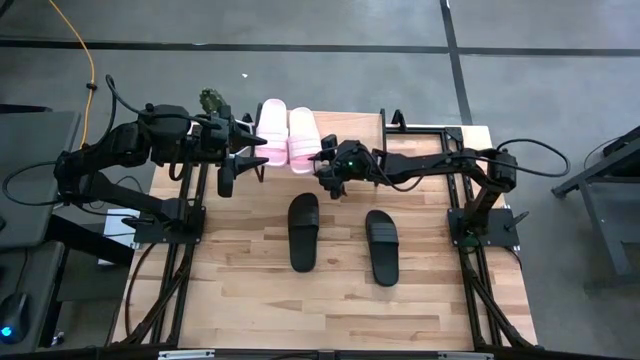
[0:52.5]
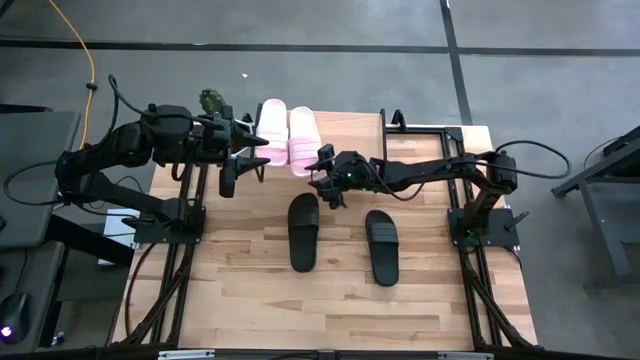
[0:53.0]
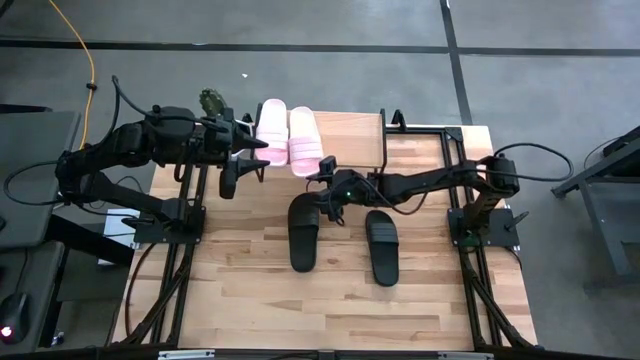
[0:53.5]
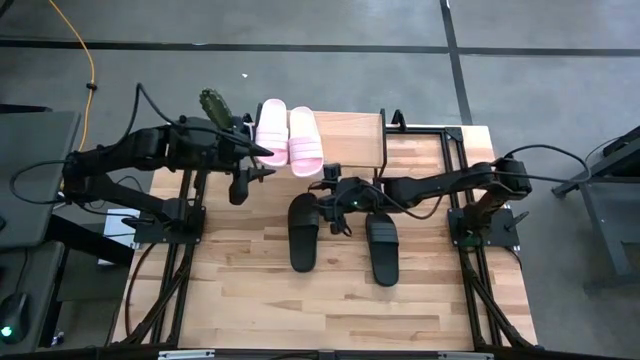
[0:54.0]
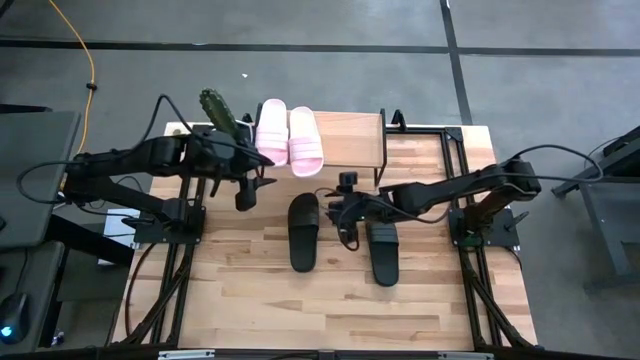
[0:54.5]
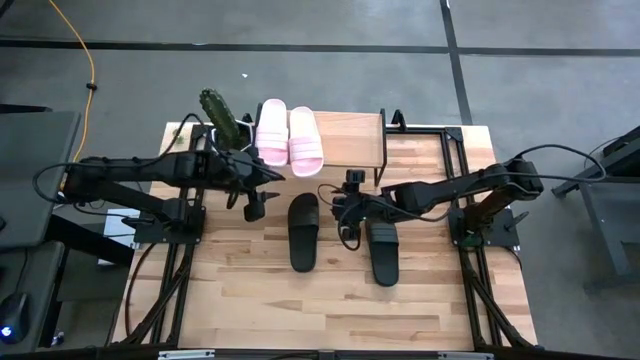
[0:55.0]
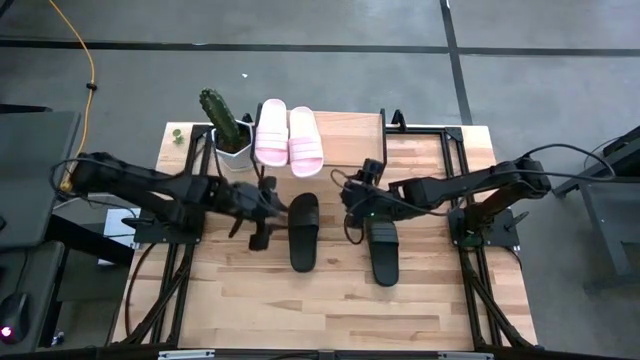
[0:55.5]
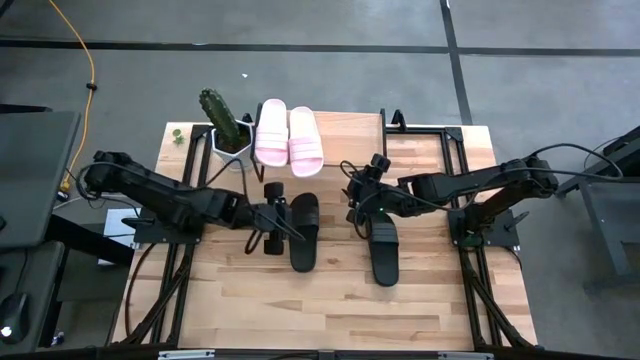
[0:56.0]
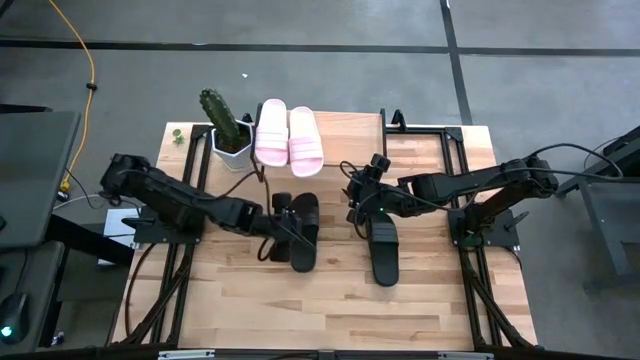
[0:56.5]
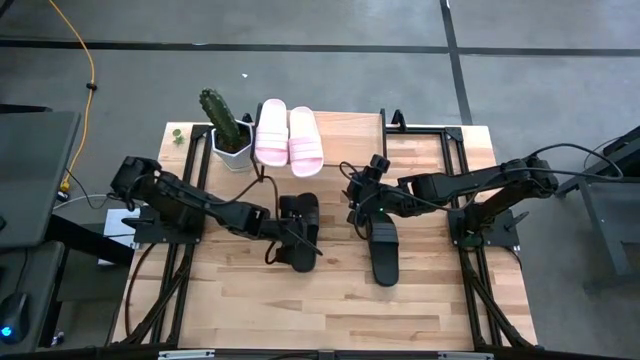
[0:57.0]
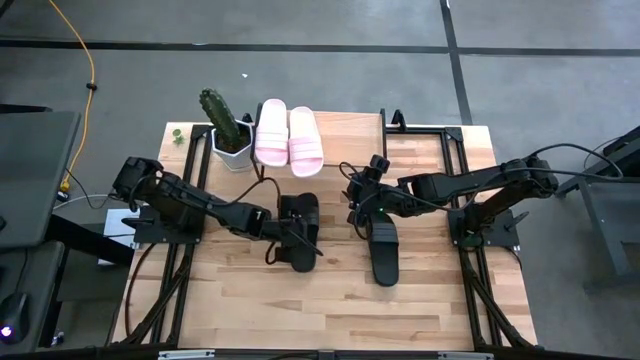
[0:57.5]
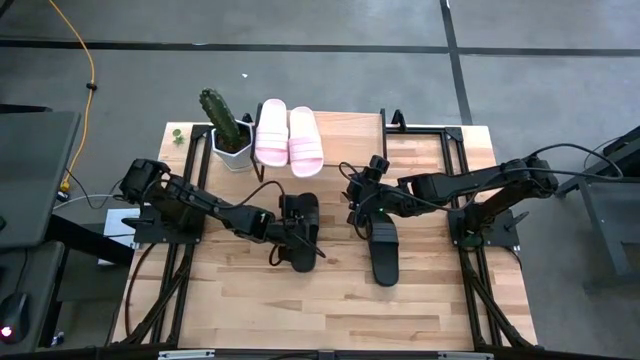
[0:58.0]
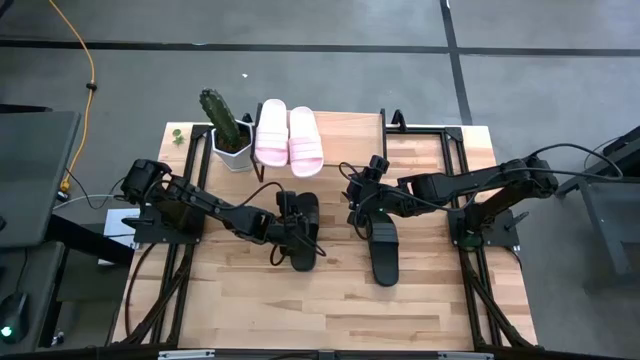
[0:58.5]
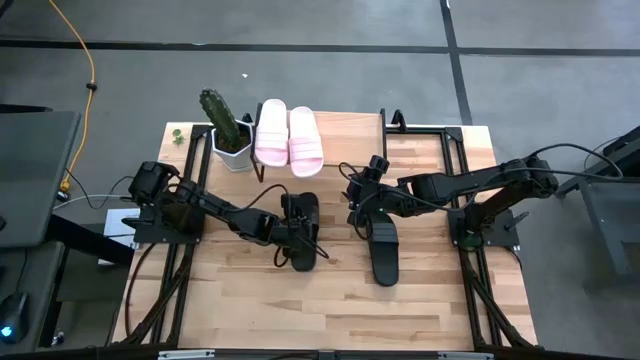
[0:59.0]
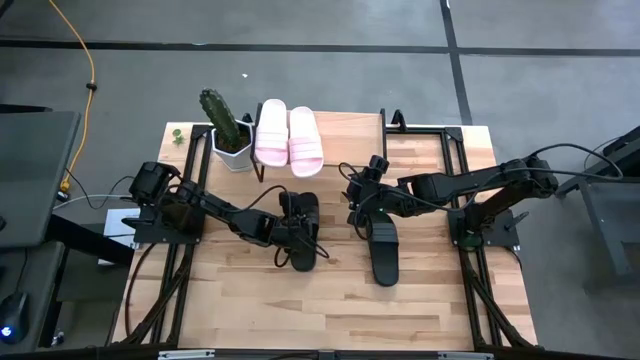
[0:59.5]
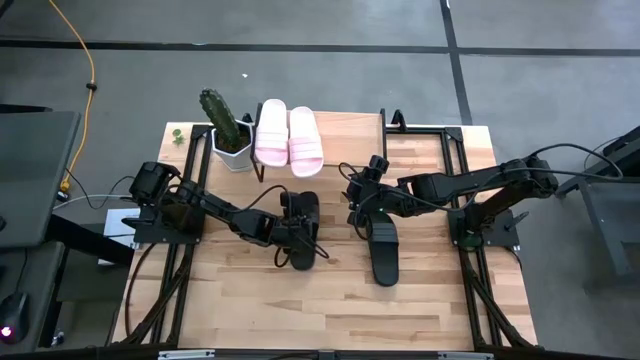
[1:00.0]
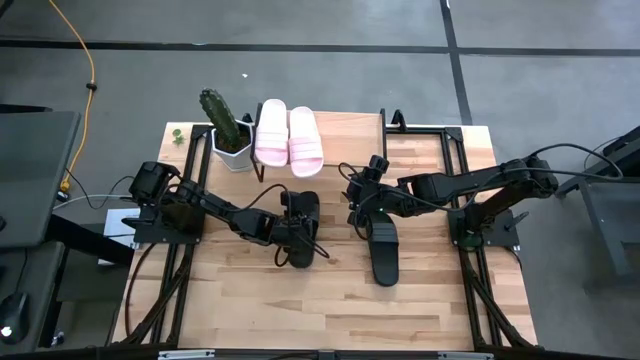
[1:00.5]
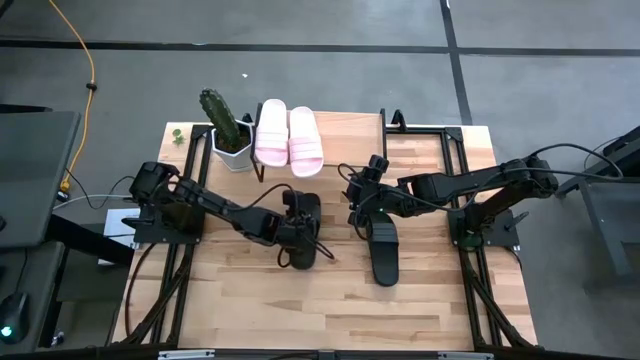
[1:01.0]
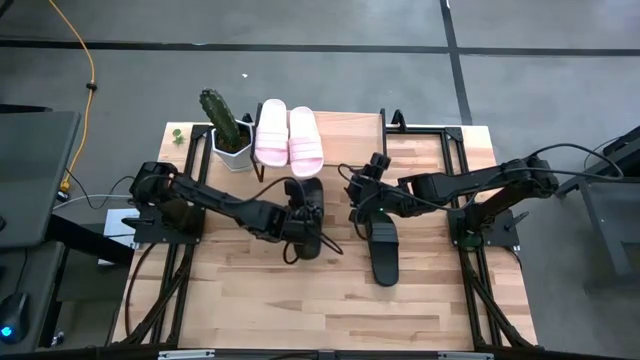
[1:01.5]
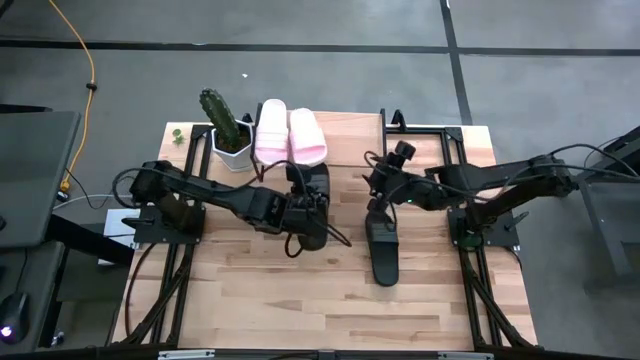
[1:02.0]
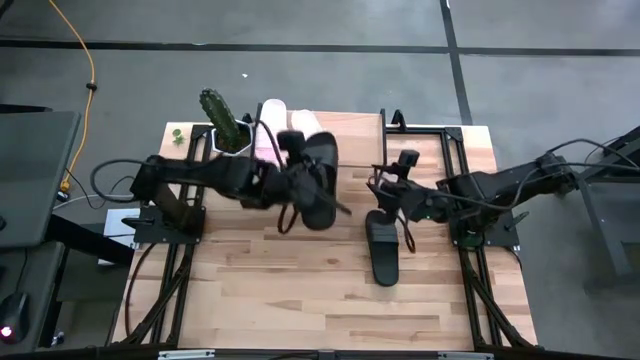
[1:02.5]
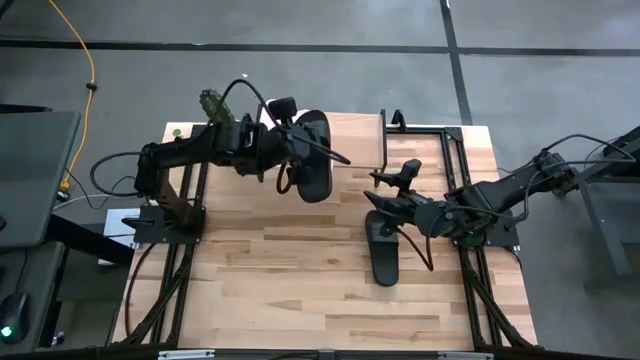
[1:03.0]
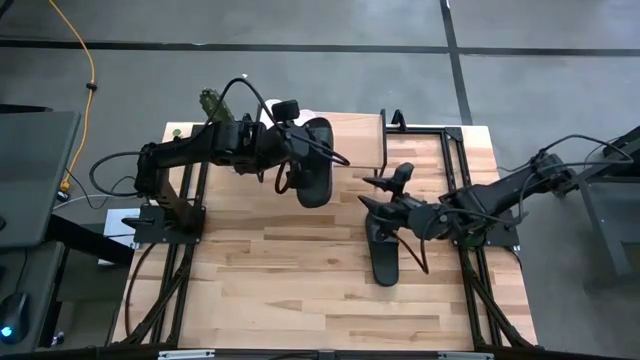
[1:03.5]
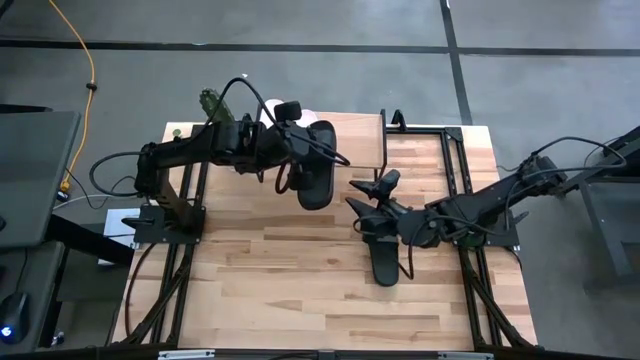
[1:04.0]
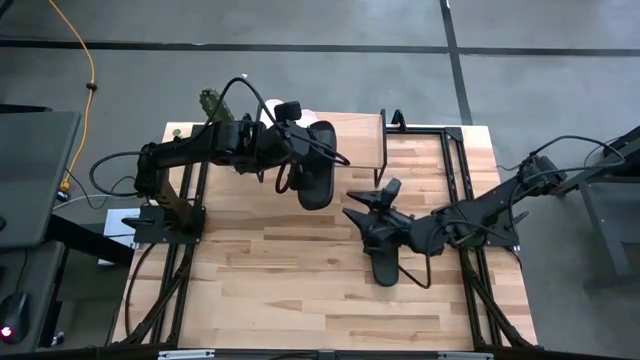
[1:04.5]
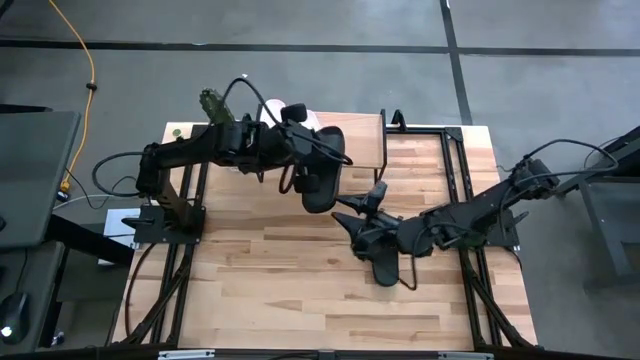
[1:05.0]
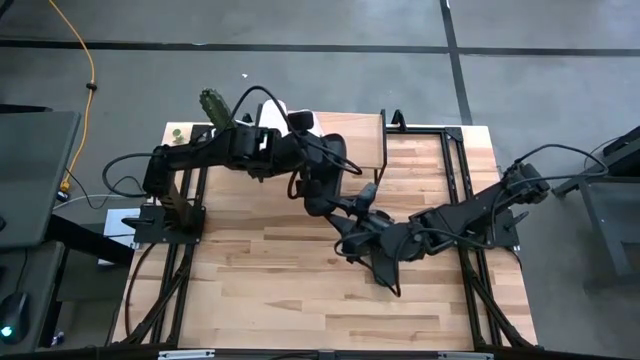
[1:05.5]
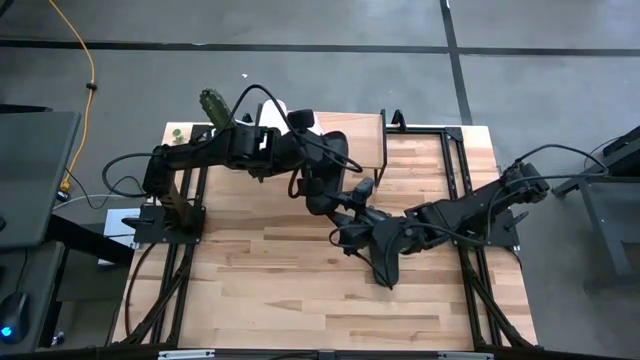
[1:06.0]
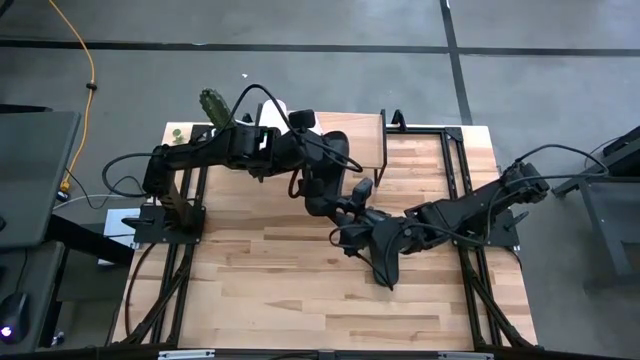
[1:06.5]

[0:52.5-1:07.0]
Task: Pick and place slides into the shelf
Put the left black slipper on the shelf

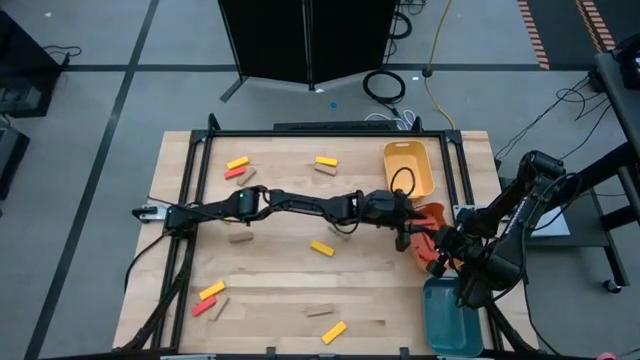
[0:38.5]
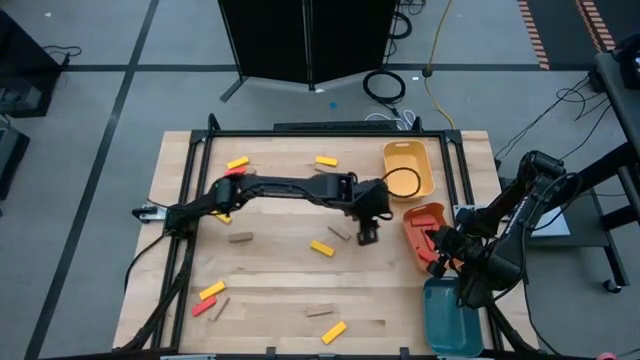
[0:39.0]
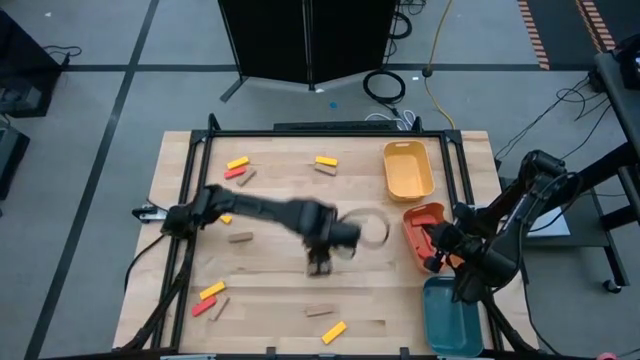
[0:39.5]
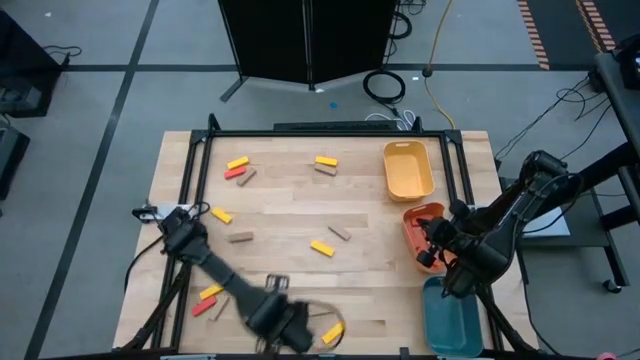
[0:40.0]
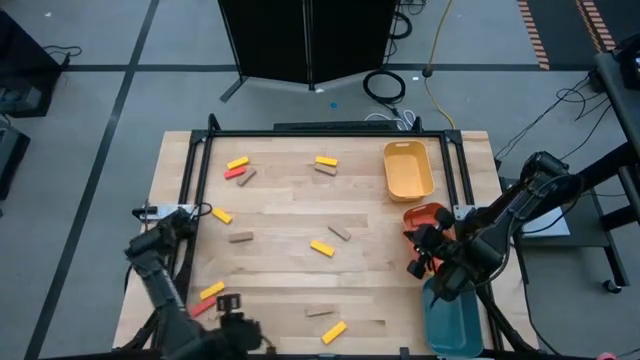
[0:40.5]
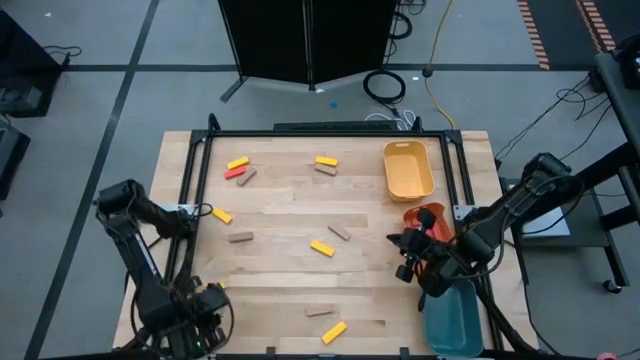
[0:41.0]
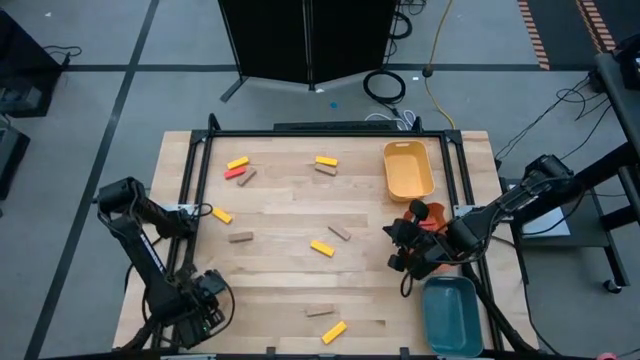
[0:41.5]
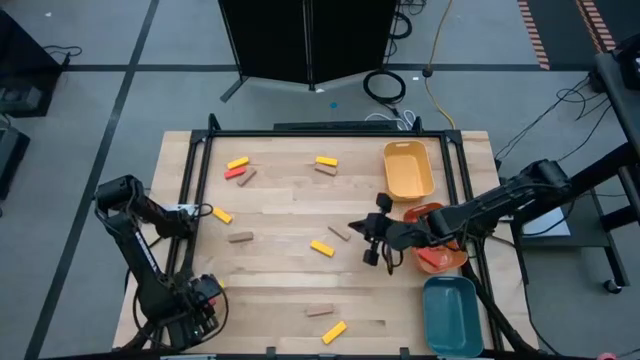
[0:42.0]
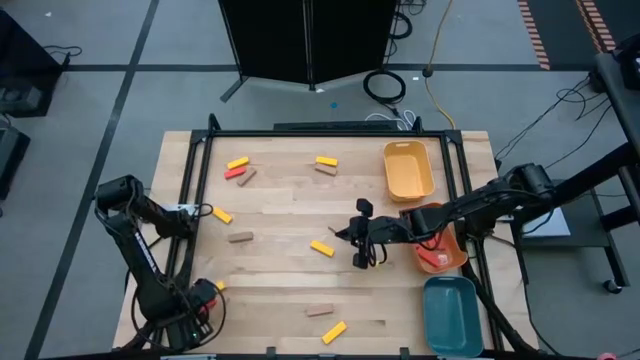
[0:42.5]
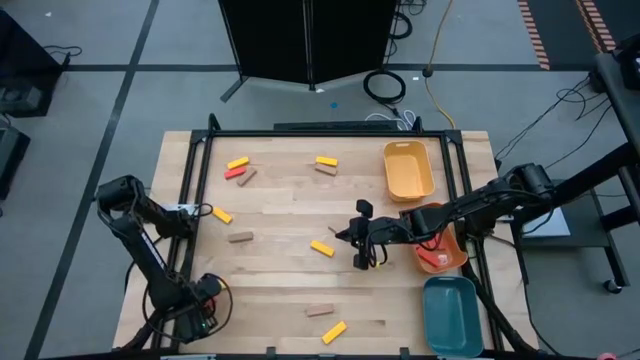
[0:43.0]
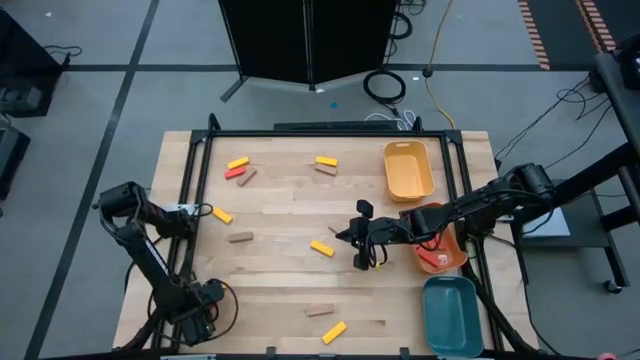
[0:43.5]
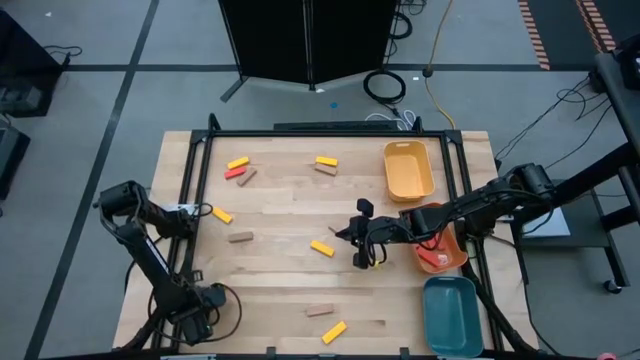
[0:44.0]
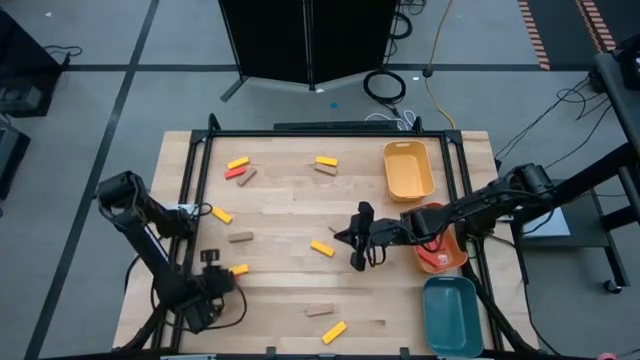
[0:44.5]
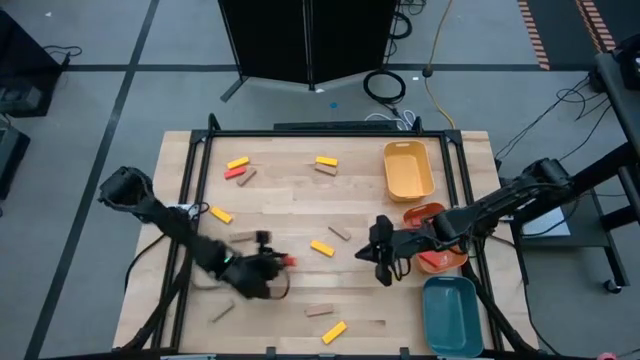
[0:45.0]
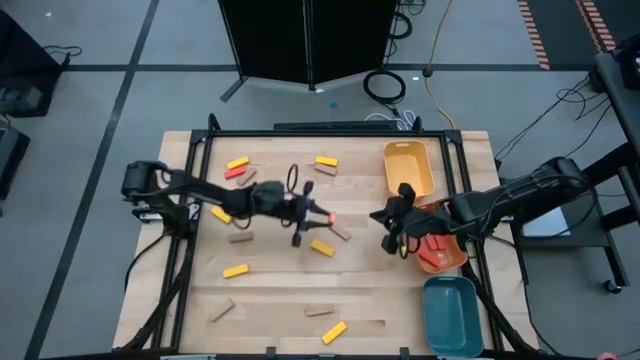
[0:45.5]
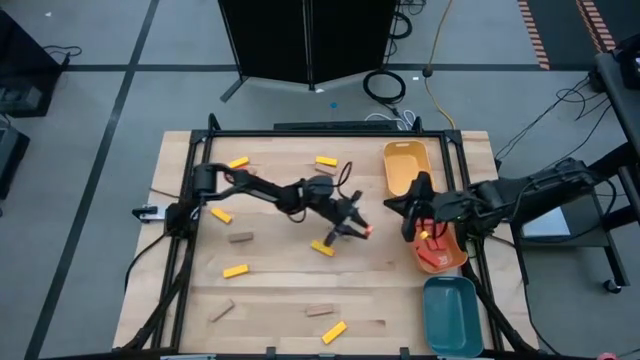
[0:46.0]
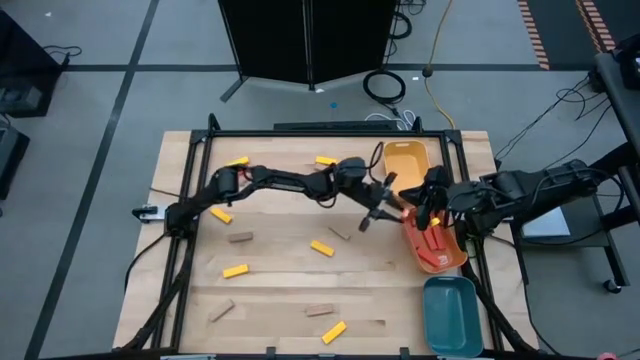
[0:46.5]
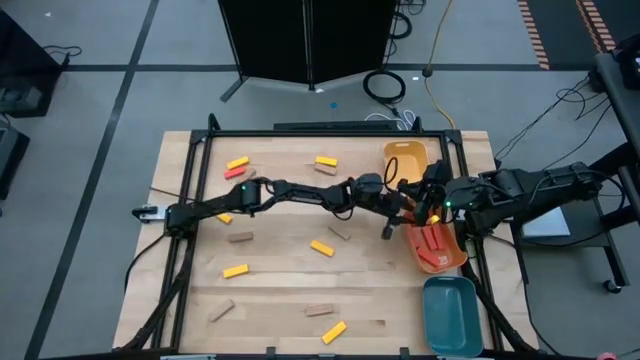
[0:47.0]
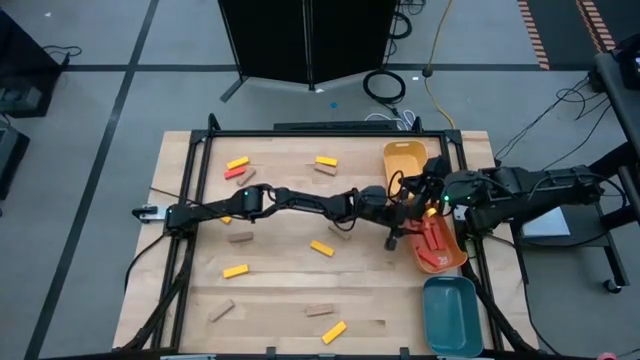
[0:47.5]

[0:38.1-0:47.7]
Task: Sort blocks
Put the red block into the orange bin
